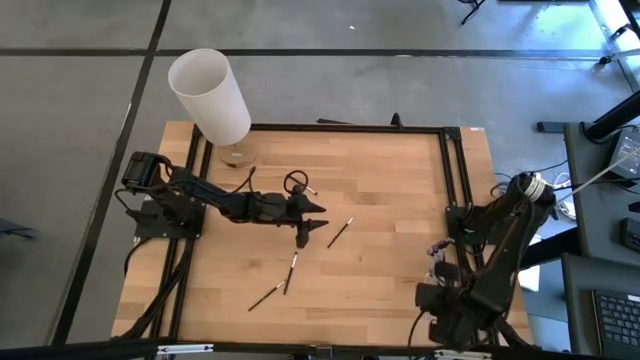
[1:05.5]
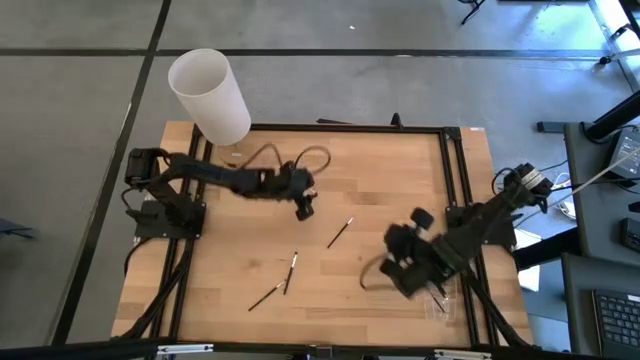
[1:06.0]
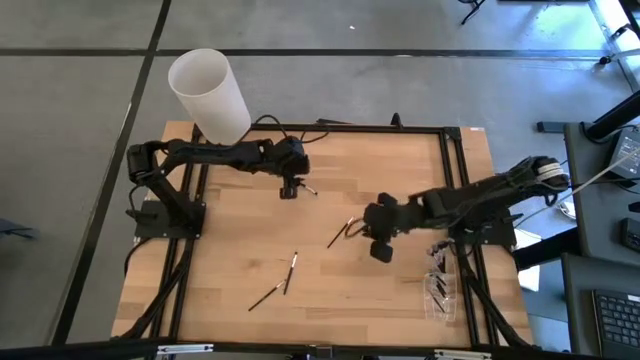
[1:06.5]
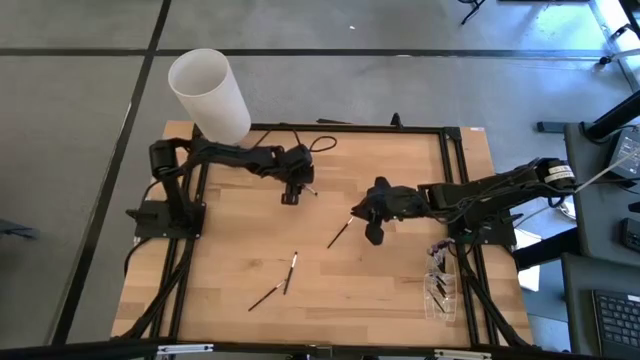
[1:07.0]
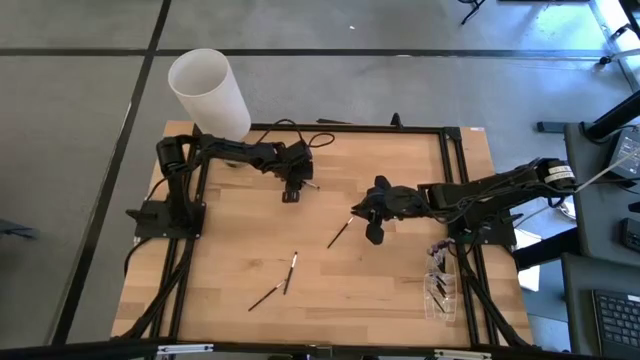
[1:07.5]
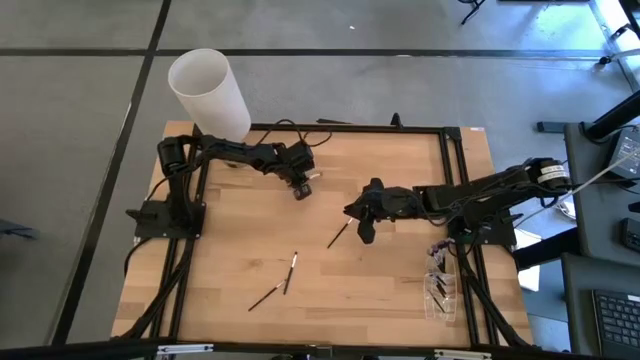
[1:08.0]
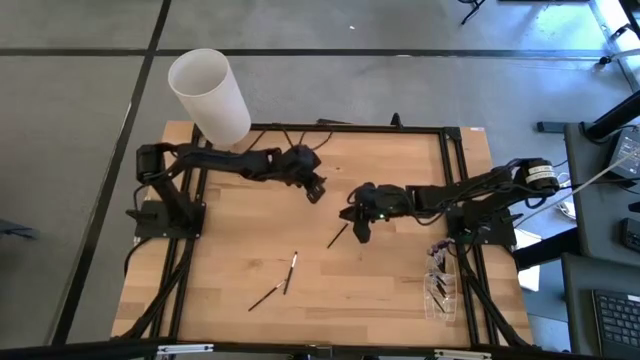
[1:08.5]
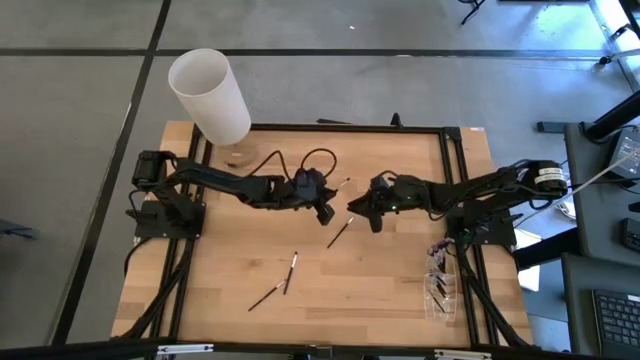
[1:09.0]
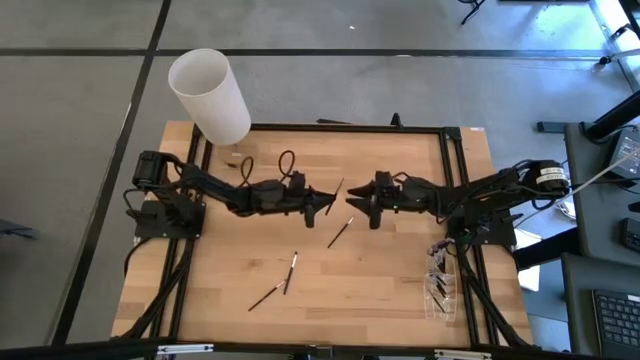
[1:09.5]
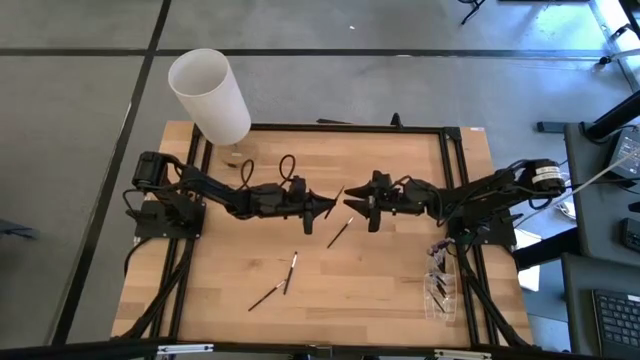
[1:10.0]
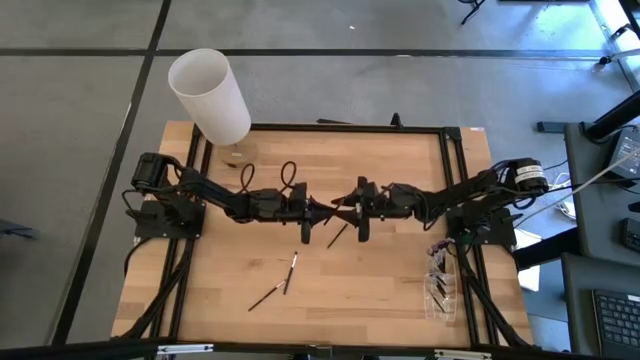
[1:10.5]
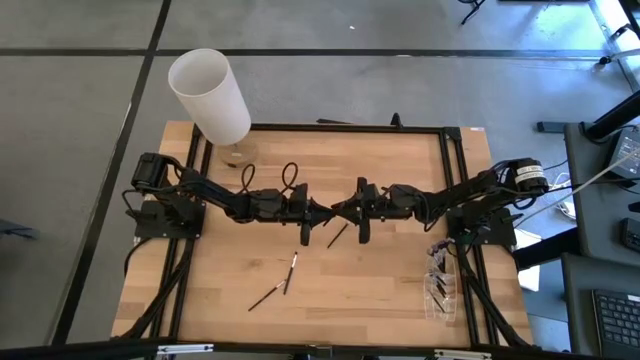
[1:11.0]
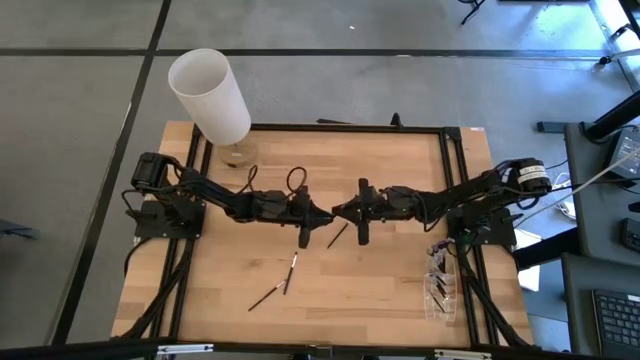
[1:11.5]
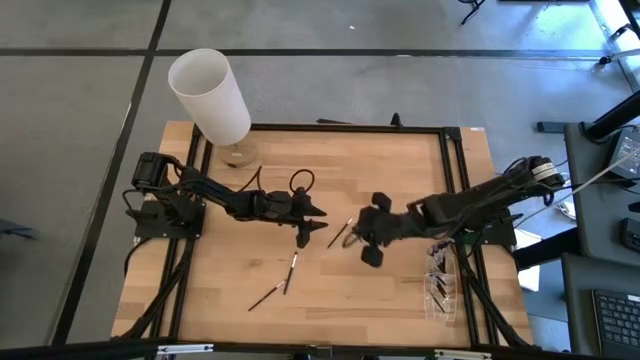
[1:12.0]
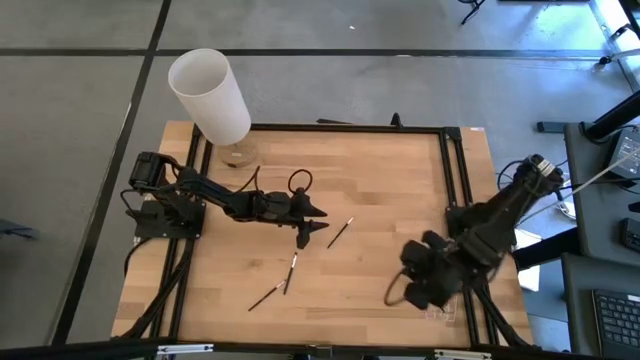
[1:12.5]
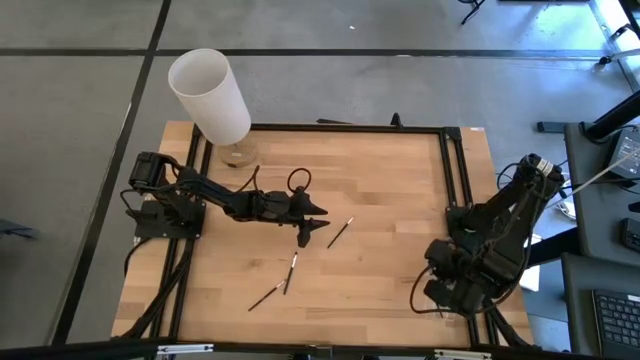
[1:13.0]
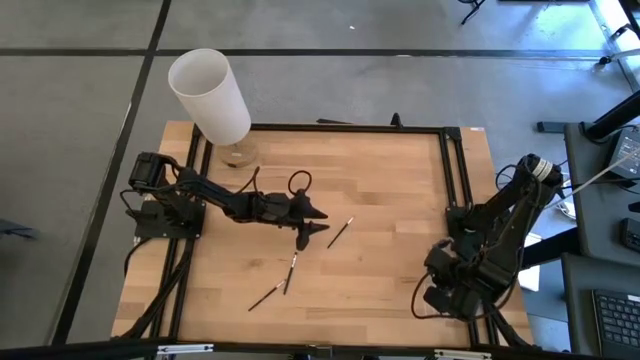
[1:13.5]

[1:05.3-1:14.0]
Task: Put items in baskets/containers
Put the eyeshadow brush into the transparent organizer

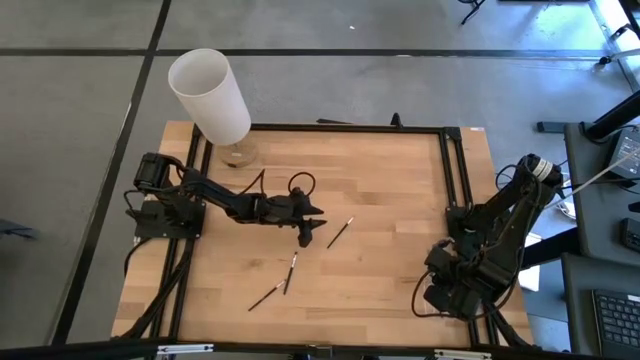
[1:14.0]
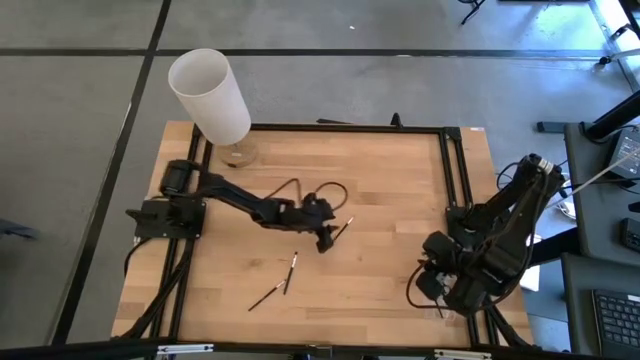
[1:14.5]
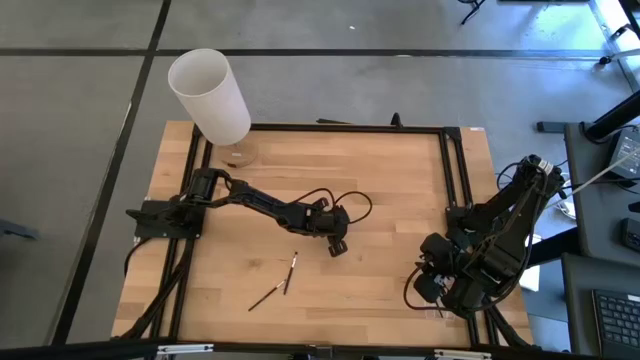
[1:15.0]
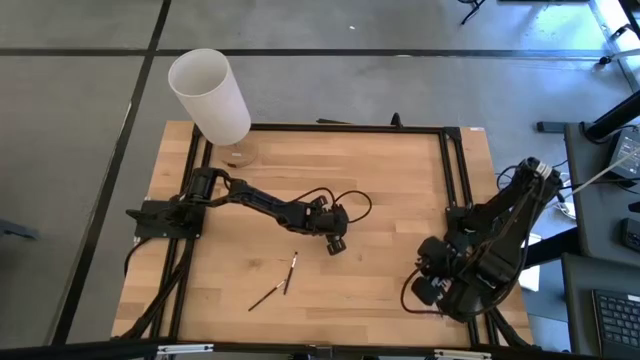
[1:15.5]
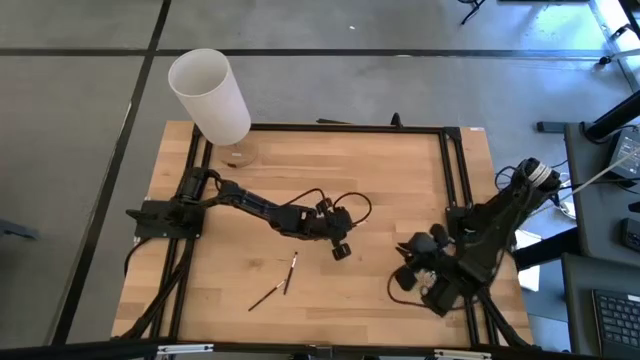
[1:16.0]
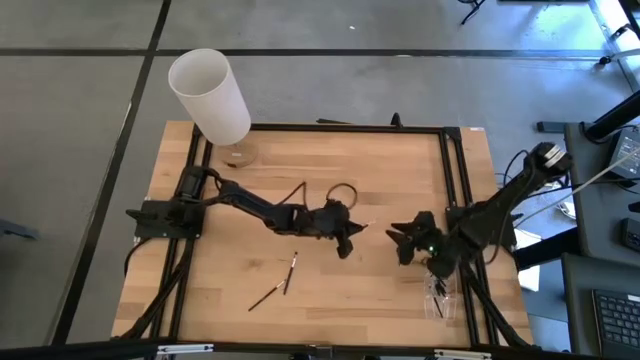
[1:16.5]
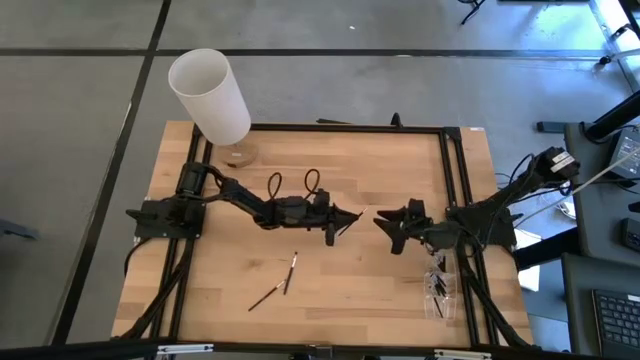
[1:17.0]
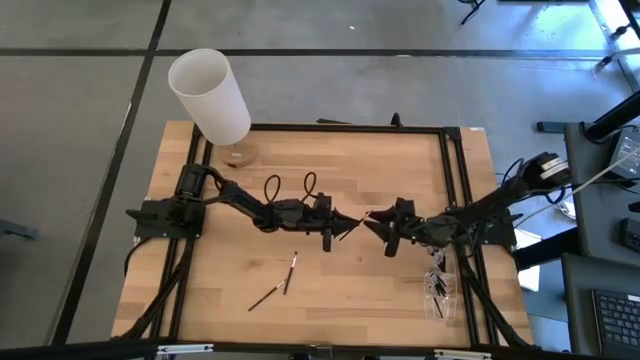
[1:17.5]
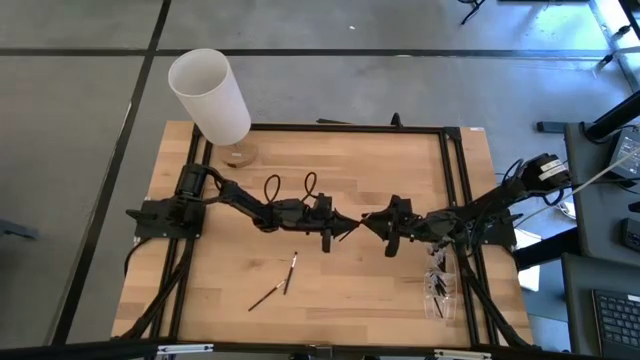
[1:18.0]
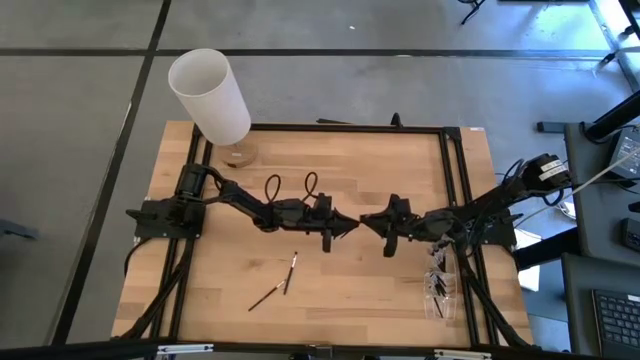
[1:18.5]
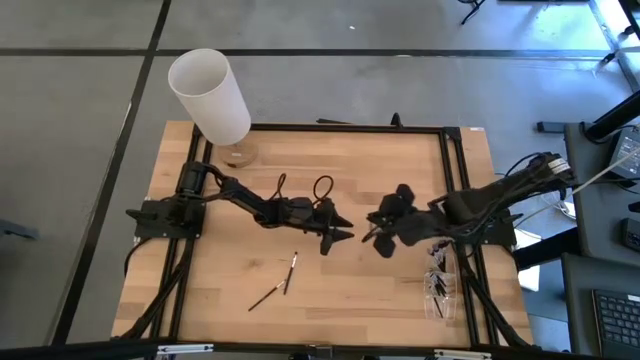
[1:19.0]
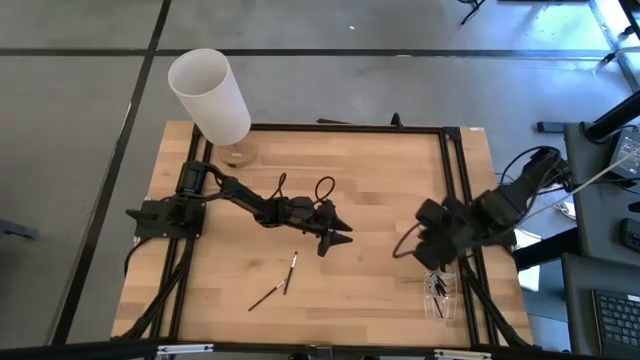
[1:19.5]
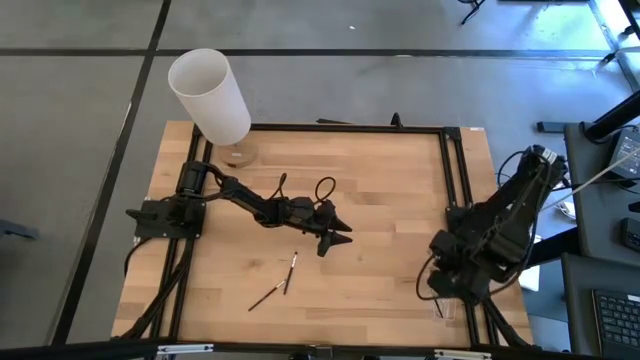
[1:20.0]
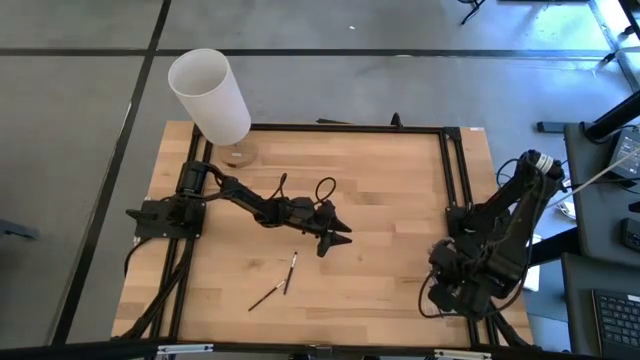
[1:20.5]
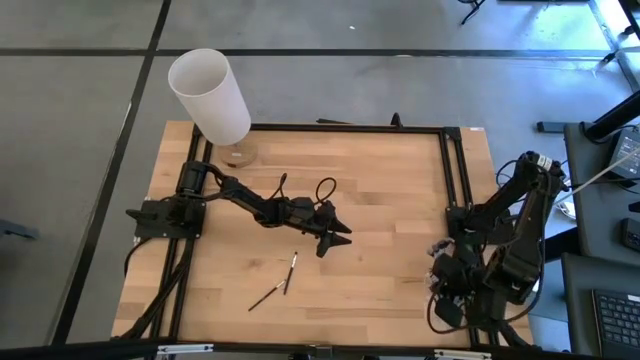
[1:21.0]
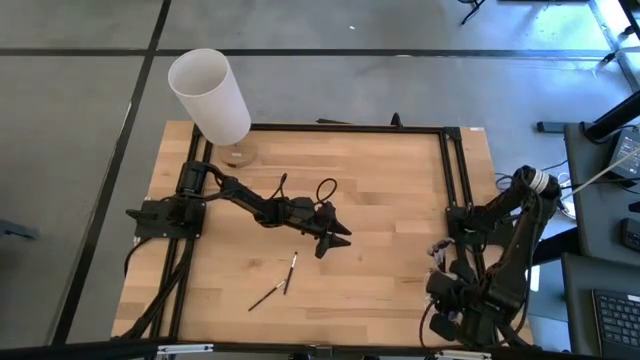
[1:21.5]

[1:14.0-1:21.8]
Put the eyeshadow brush into the transparent organizer

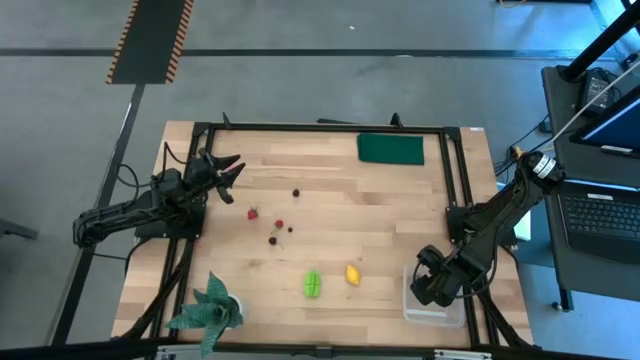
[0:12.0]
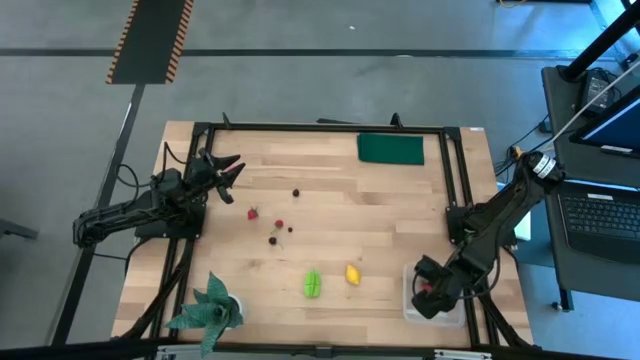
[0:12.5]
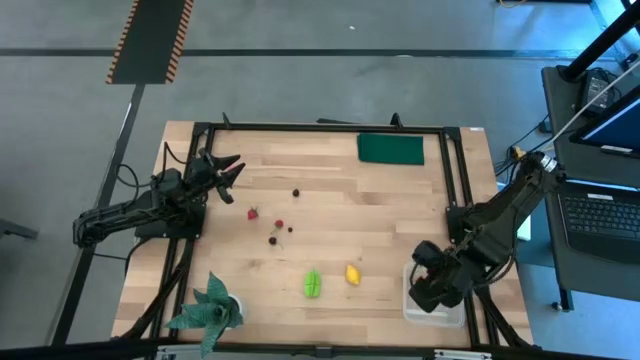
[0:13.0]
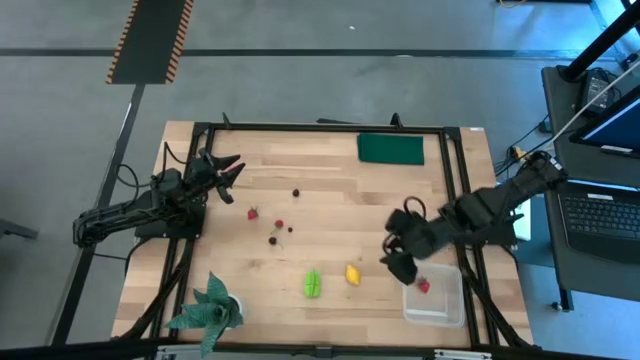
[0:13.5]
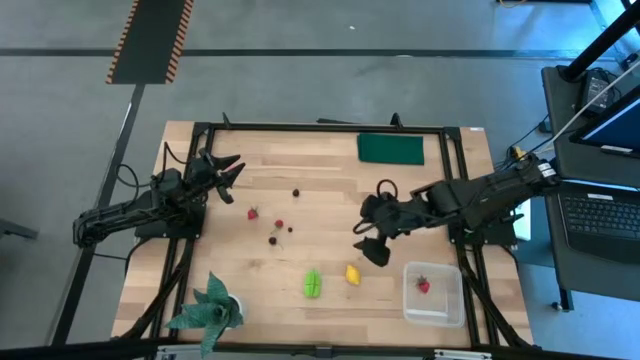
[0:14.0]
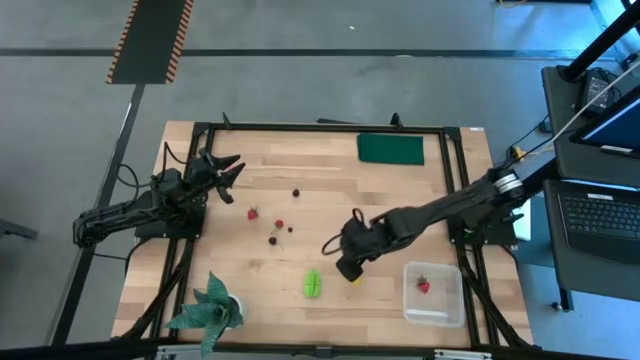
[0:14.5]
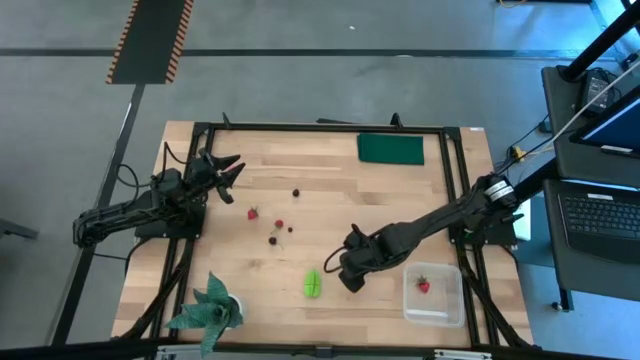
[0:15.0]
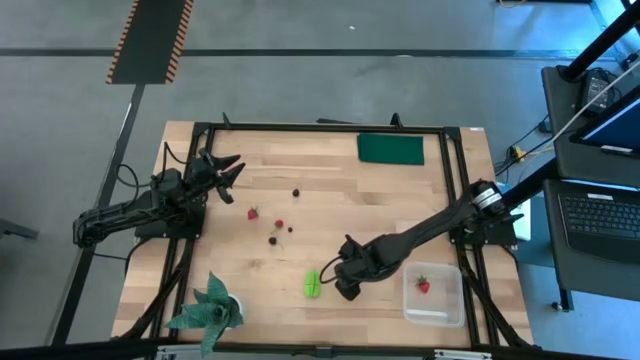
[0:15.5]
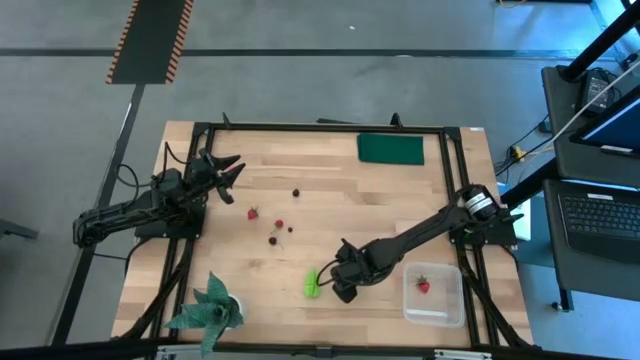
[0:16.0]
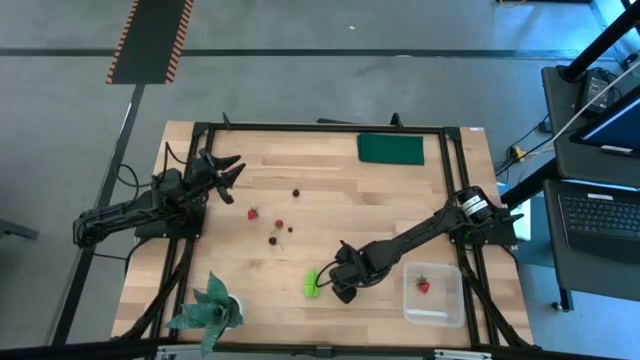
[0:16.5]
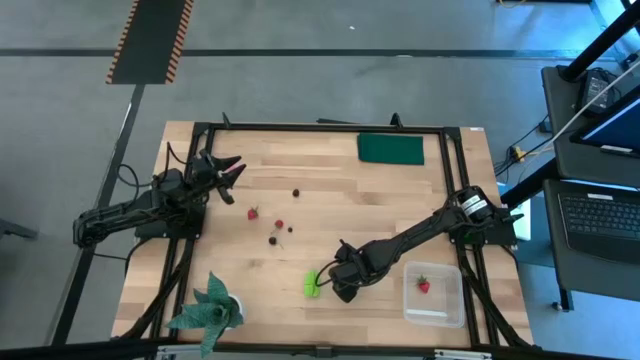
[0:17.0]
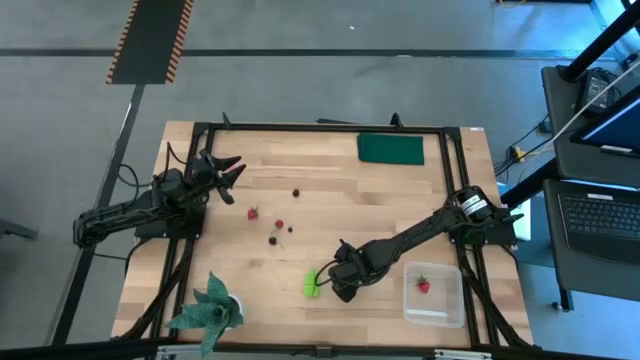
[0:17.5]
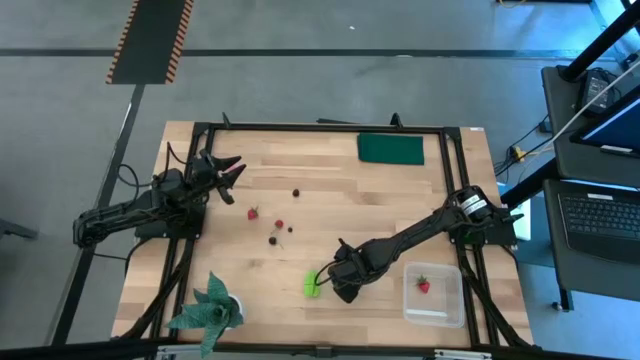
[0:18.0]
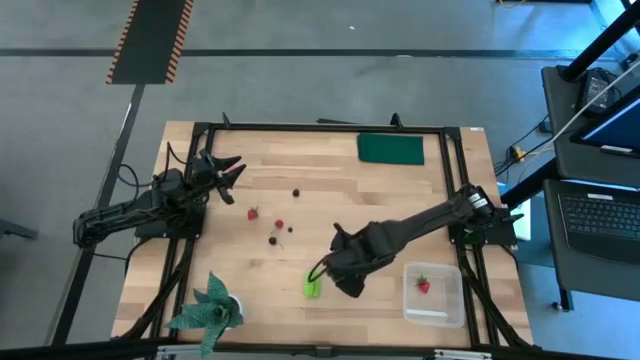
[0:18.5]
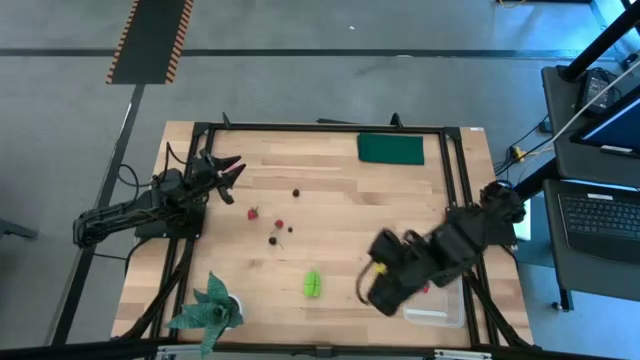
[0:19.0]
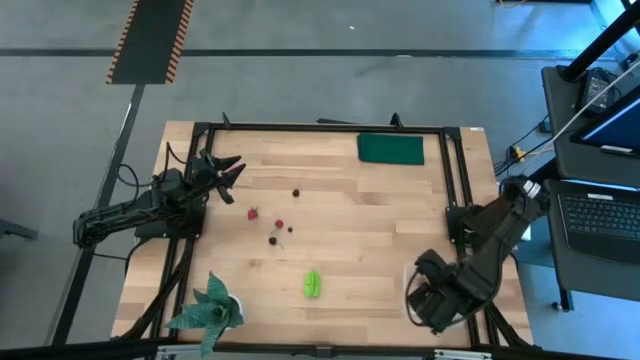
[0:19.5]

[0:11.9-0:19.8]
Task: Pick and placing Produce into tupperware
Put the yellow lemon into the transparent bin
